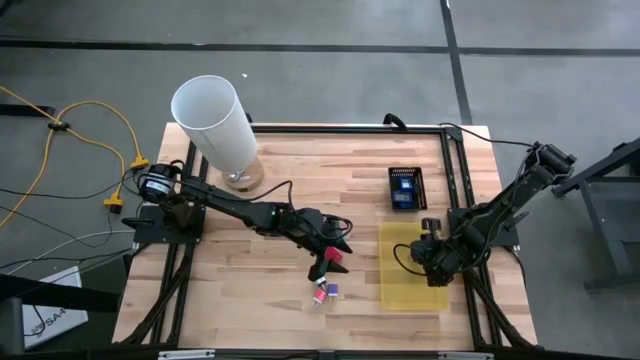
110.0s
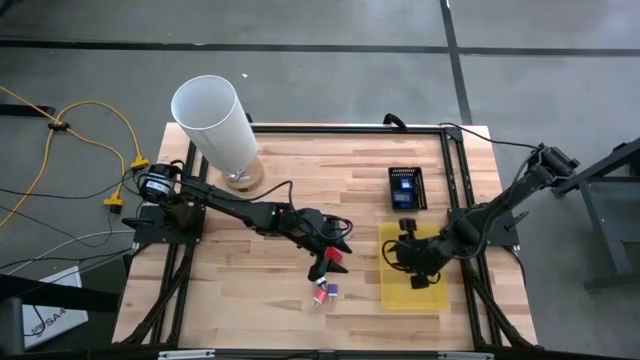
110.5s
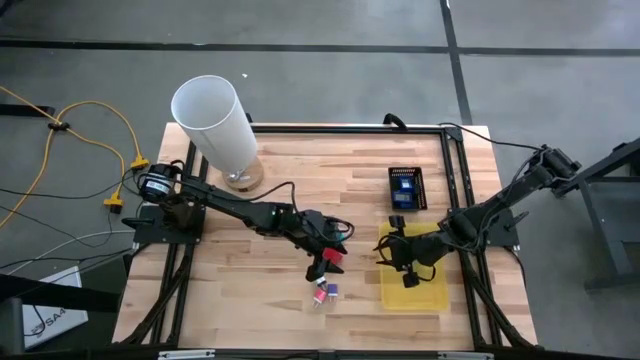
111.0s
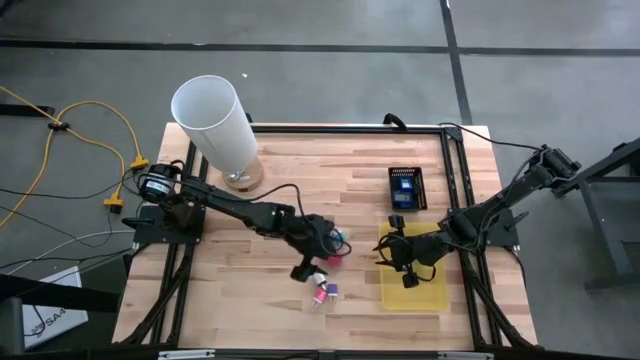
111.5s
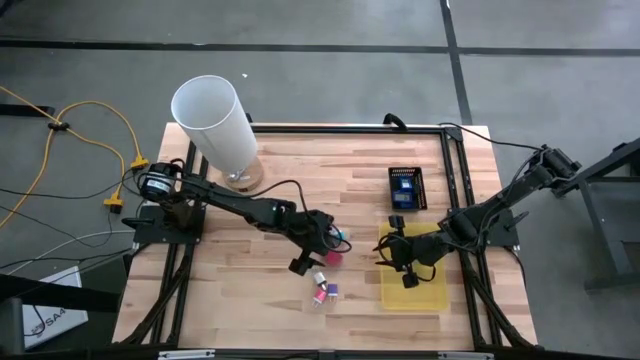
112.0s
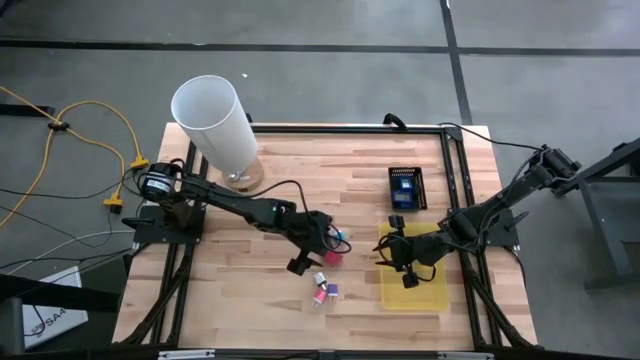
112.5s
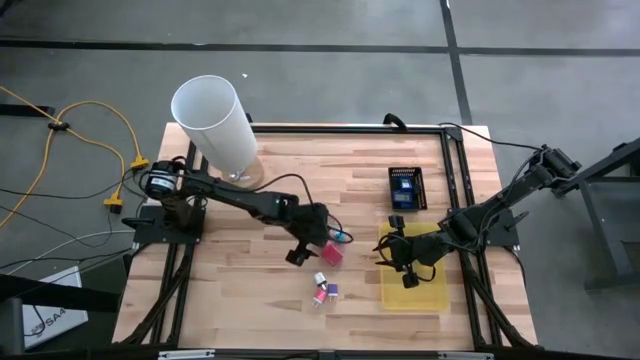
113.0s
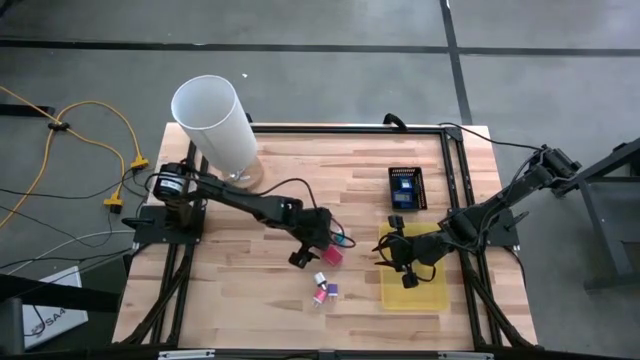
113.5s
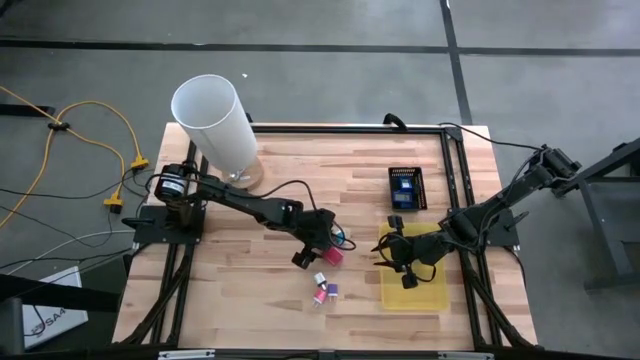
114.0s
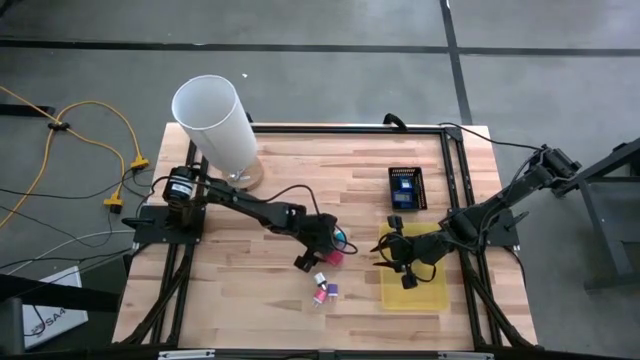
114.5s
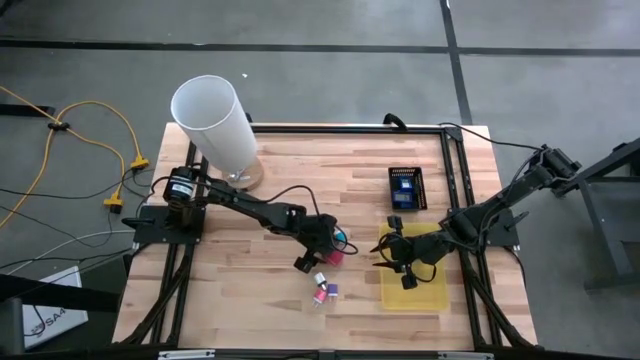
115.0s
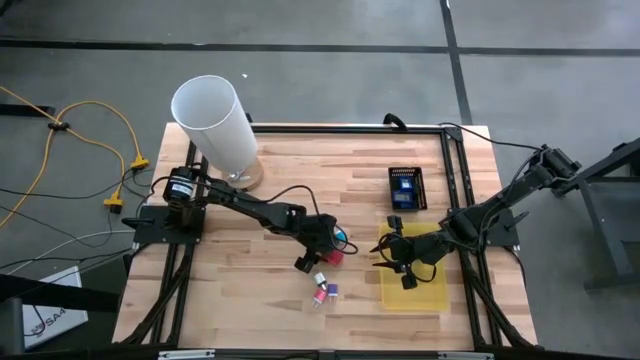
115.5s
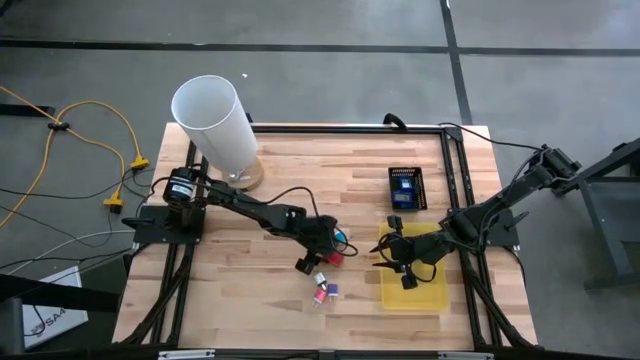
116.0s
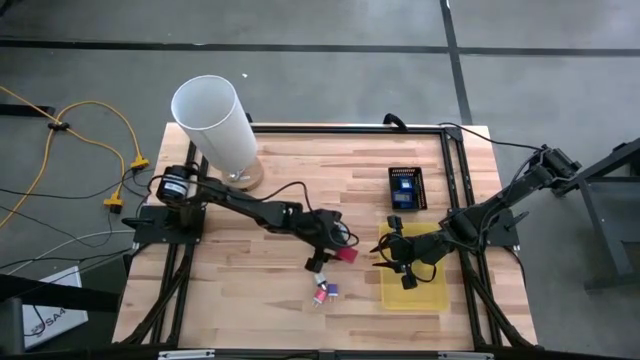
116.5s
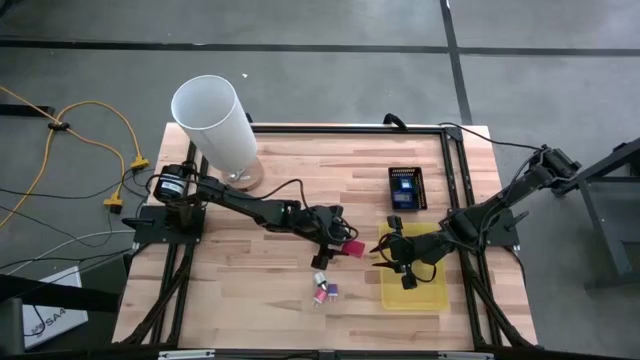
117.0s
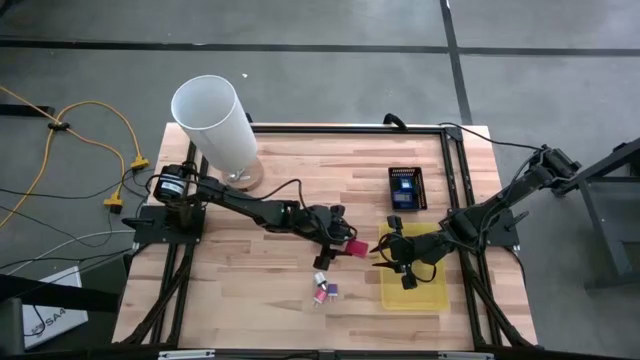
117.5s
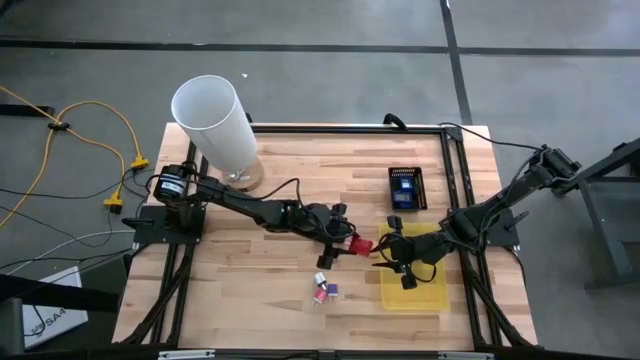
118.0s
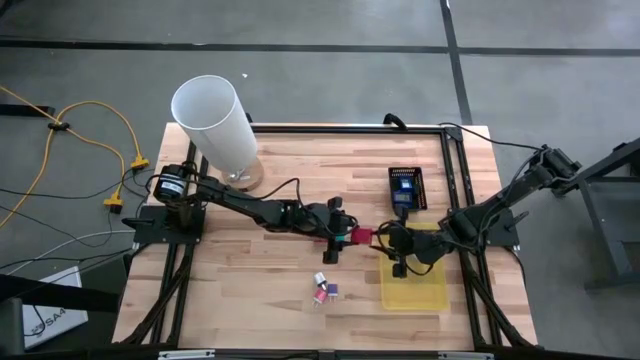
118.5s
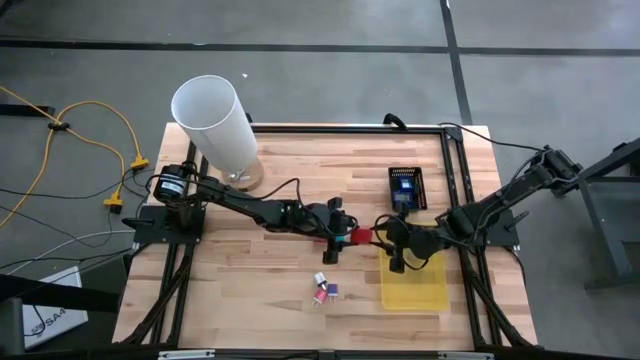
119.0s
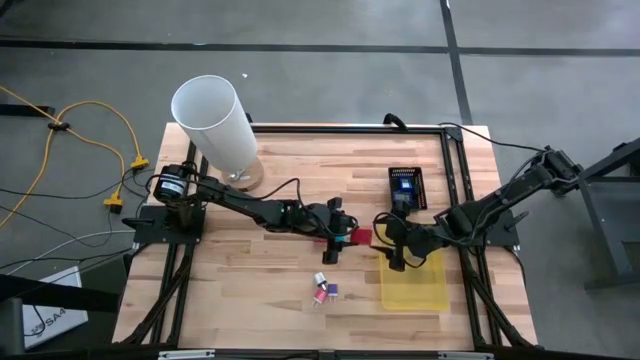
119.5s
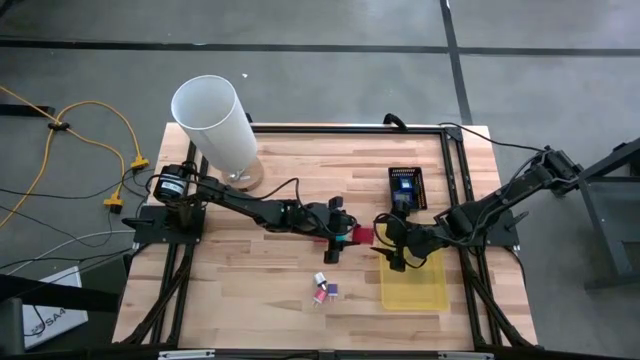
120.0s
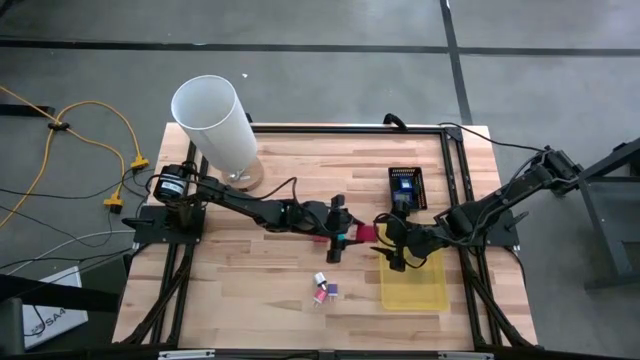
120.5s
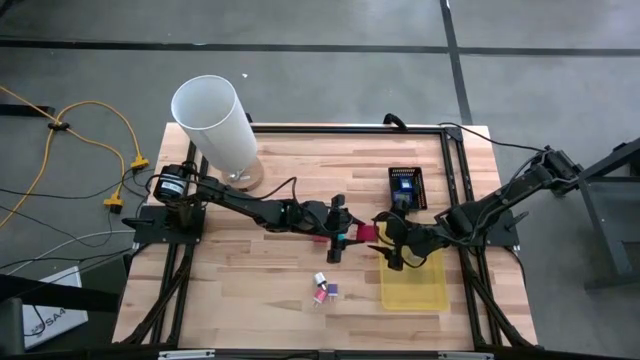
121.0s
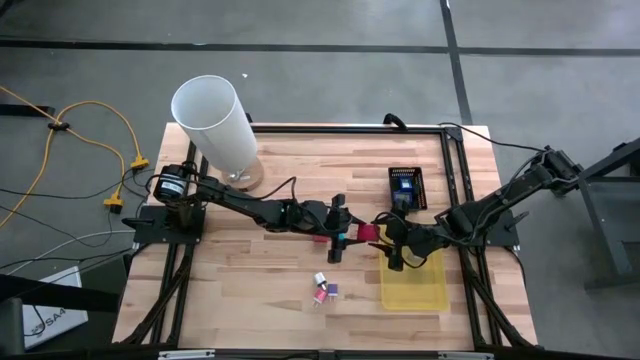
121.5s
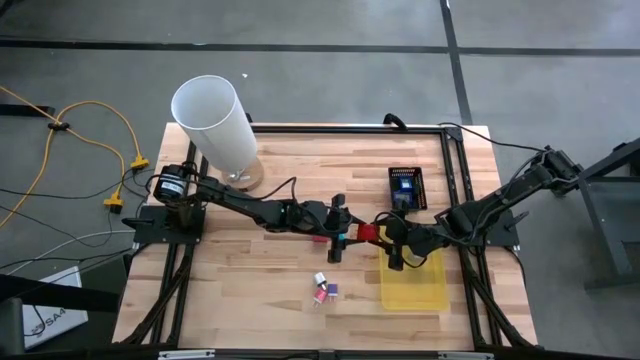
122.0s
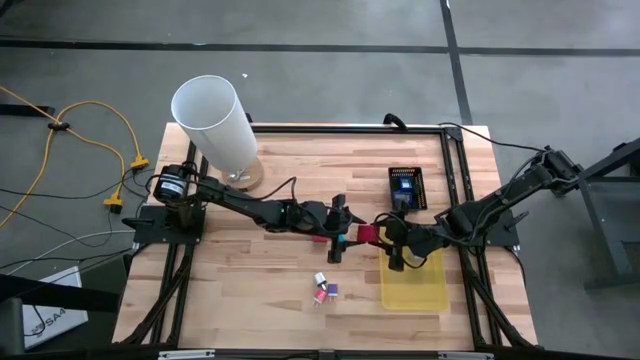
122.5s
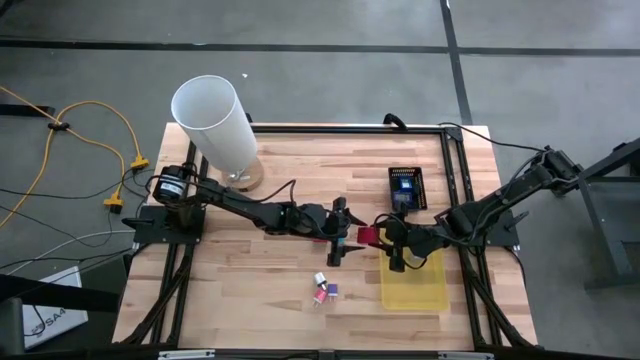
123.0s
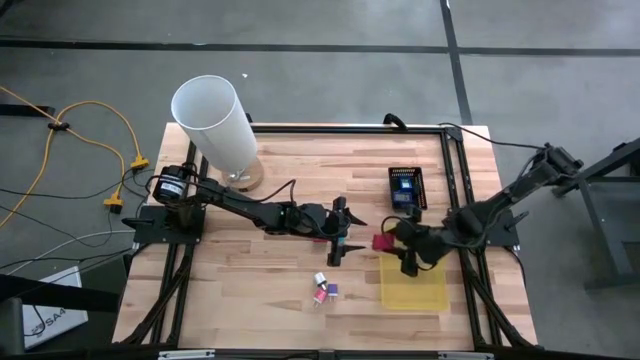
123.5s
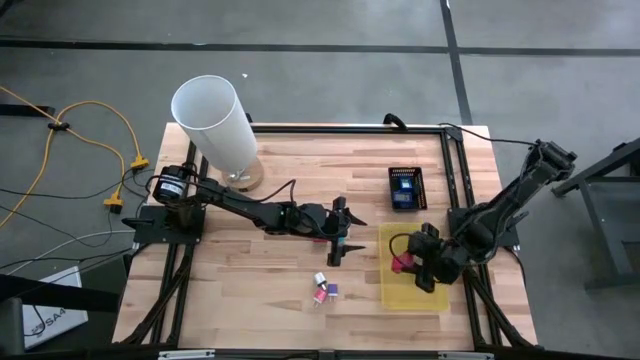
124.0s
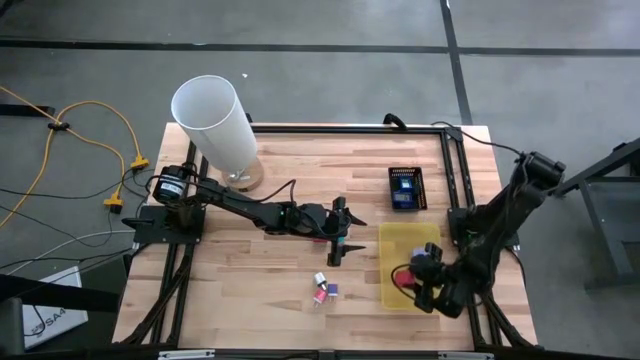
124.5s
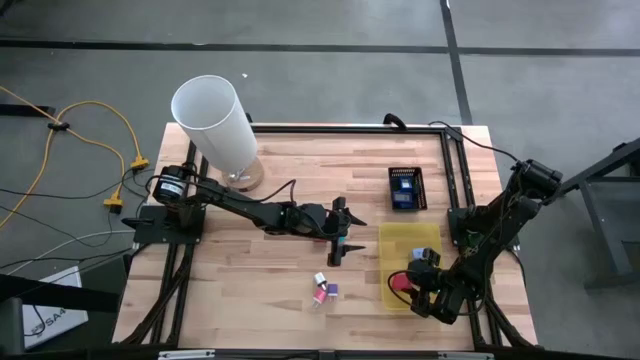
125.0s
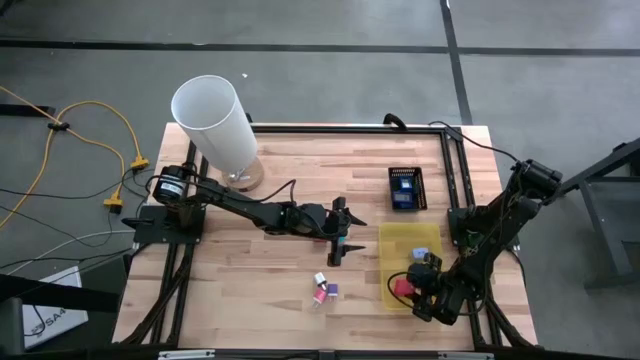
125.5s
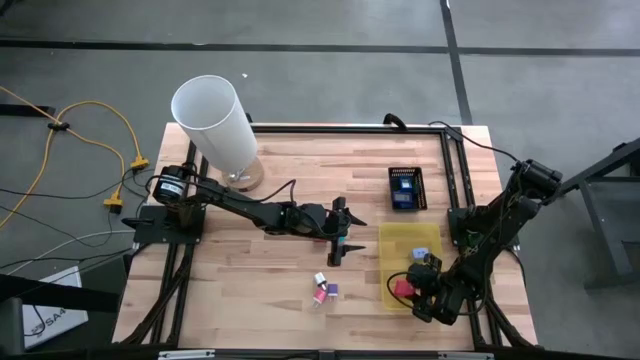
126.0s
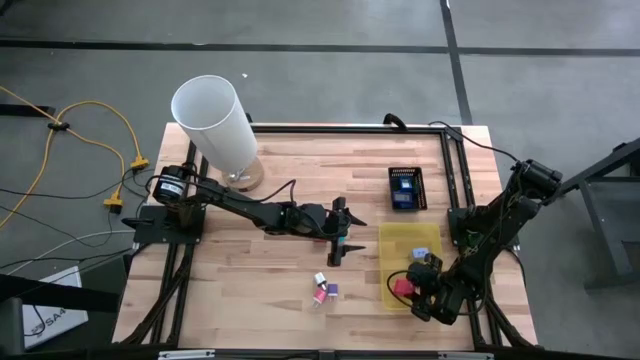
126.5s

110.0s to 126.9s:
Task: Pick & Place Office items
Put the bottom red charger adapter into the yellow bin

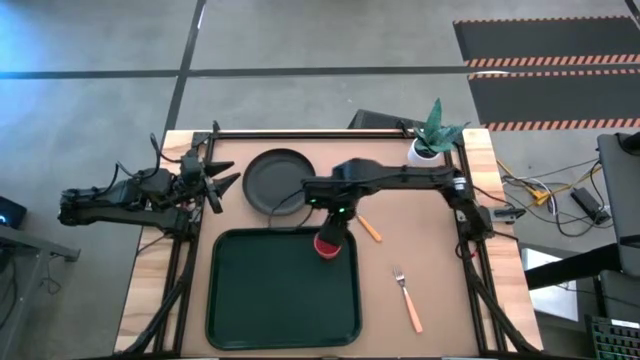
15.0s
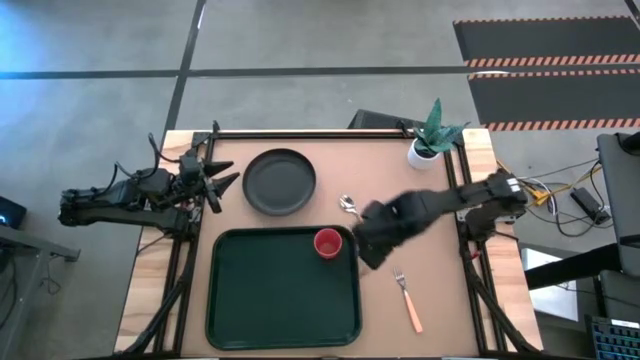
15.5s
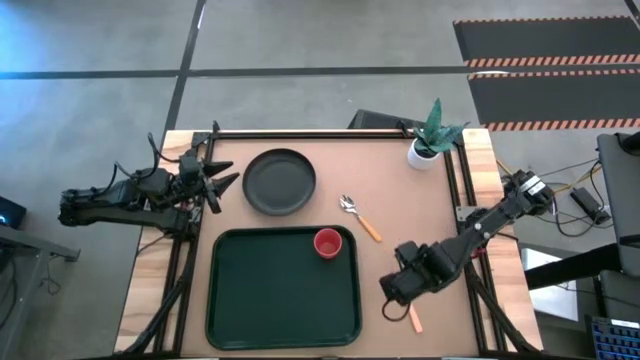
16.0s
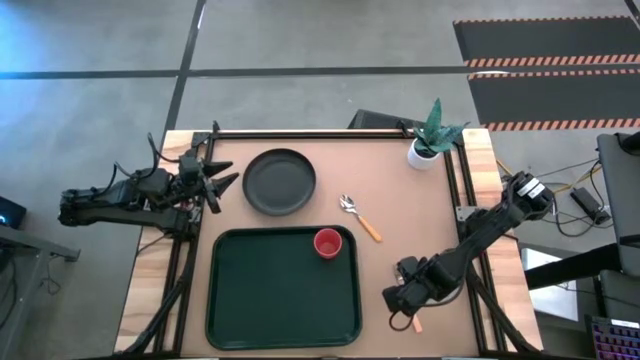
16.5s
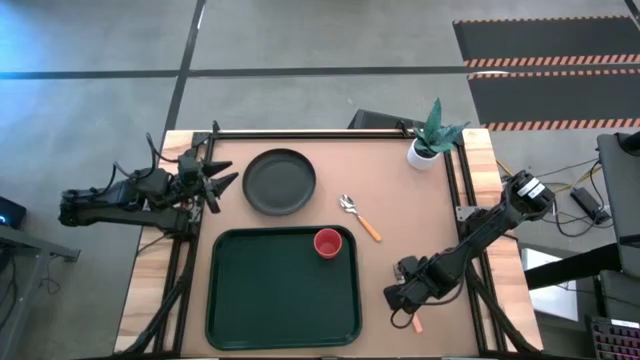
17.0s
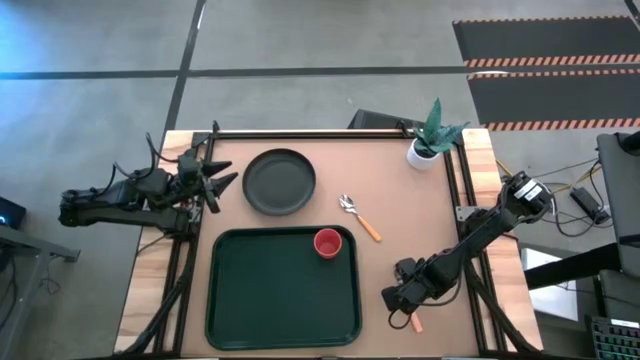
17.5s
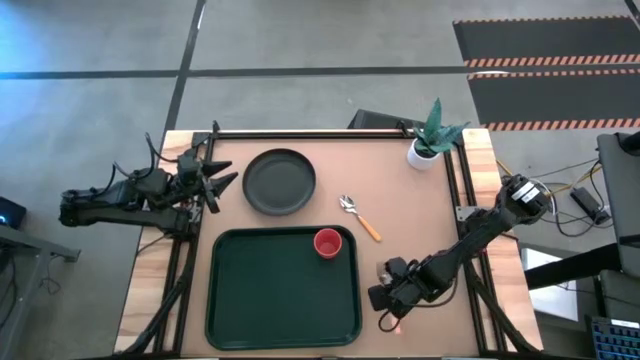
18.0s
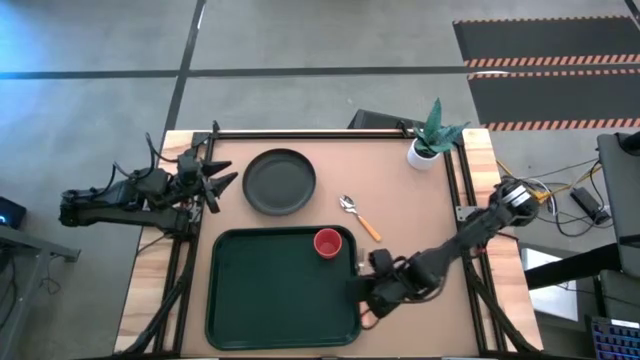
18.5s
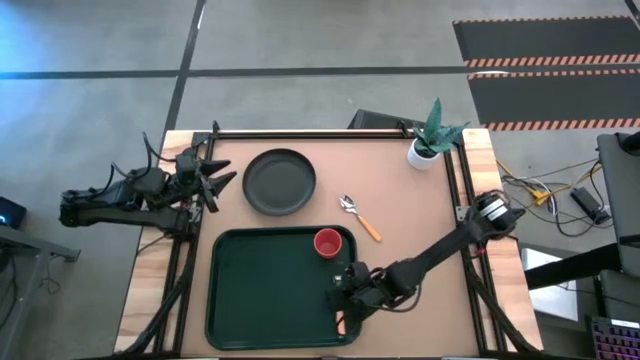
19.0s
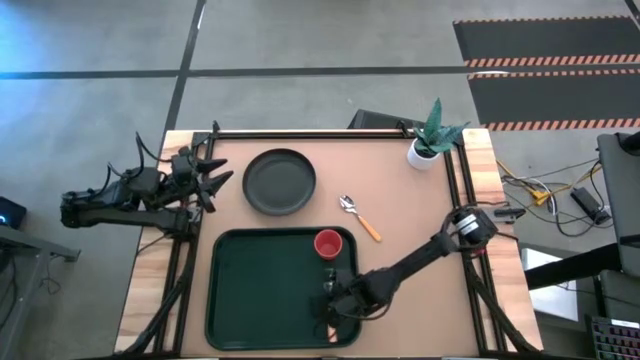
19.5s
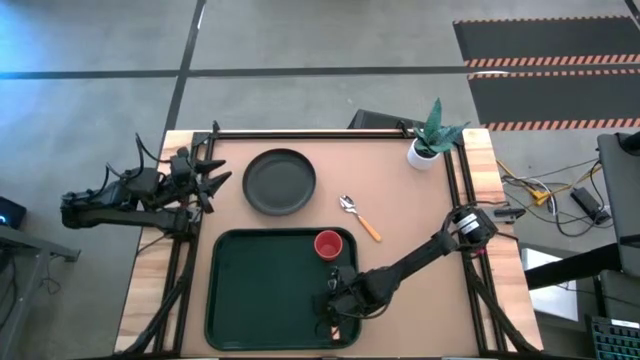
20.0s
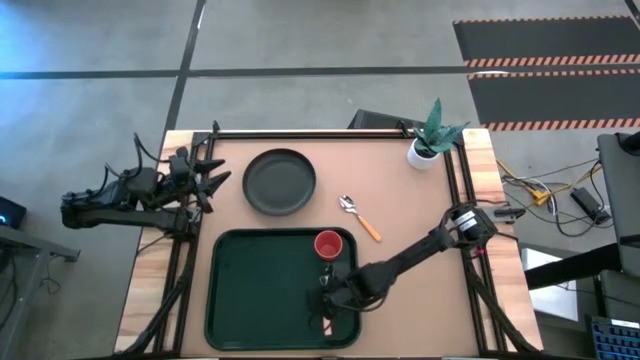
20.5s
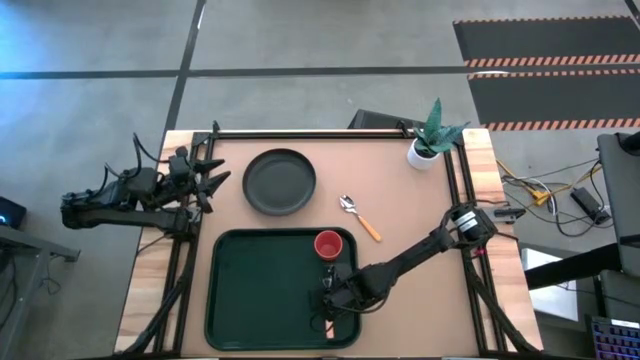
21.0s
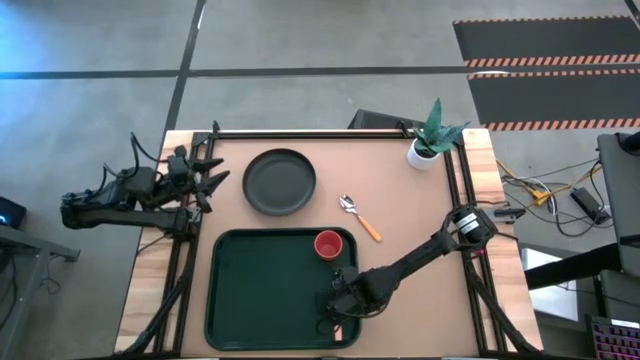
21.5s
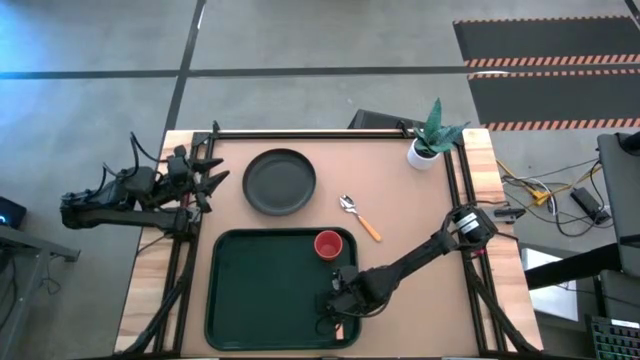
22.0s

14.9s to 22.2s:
Task: Pick and place plate/cup/fork/spoon on tray
Put the light orange fork on the bottom right of the black tray
